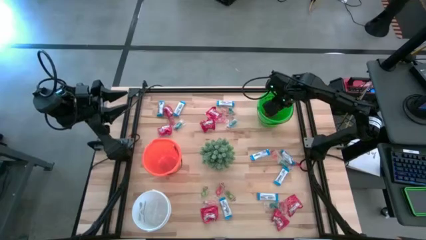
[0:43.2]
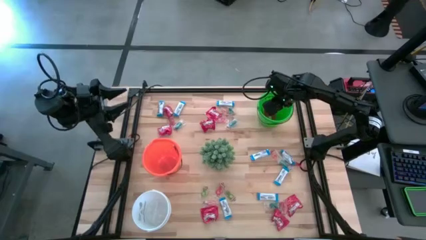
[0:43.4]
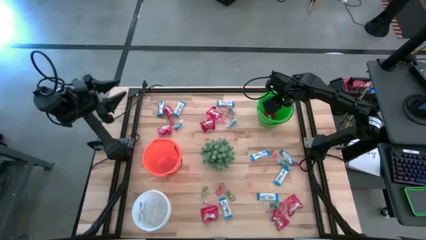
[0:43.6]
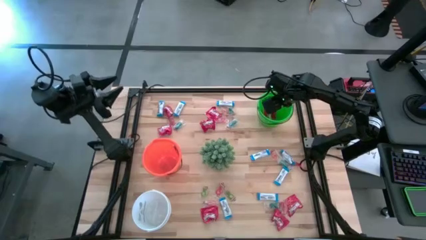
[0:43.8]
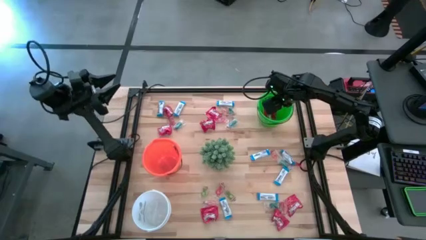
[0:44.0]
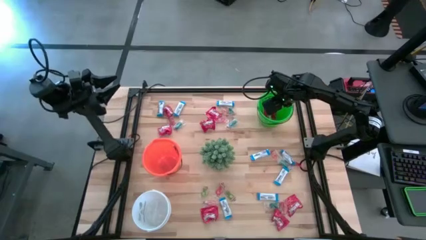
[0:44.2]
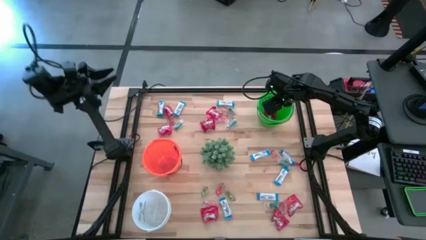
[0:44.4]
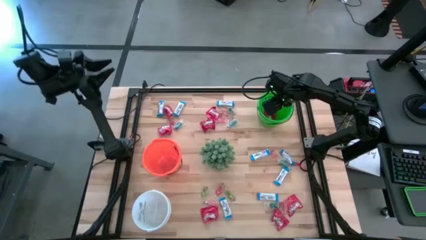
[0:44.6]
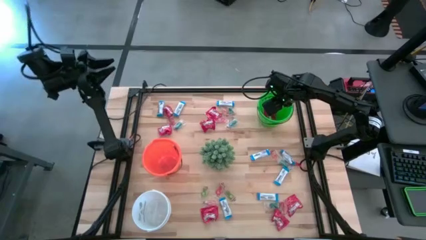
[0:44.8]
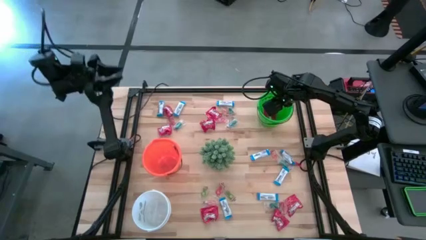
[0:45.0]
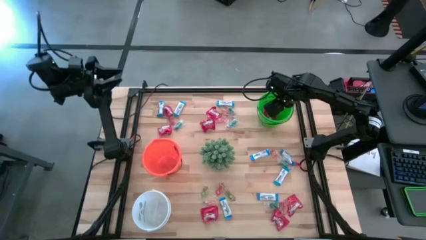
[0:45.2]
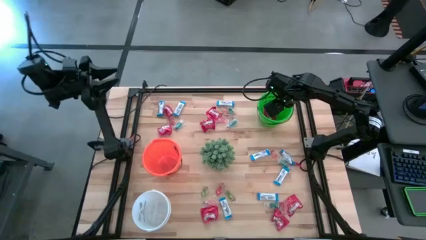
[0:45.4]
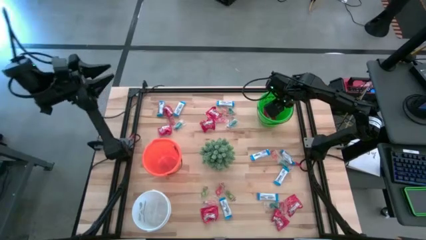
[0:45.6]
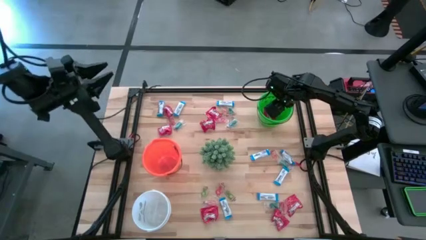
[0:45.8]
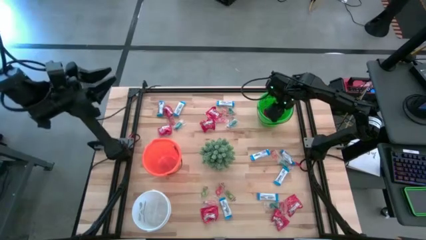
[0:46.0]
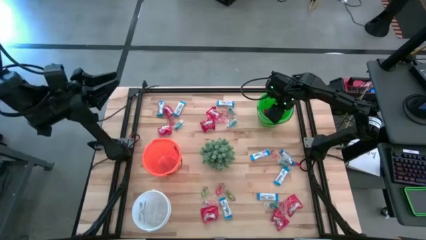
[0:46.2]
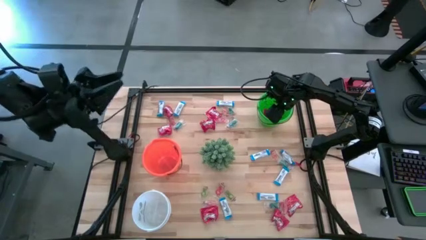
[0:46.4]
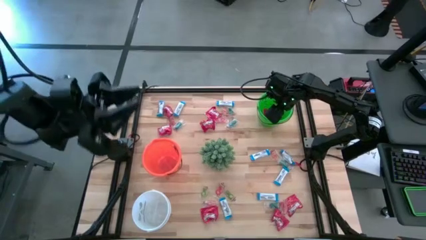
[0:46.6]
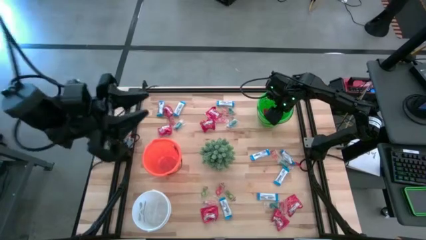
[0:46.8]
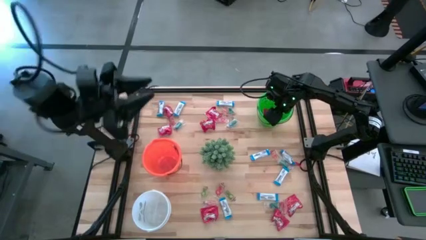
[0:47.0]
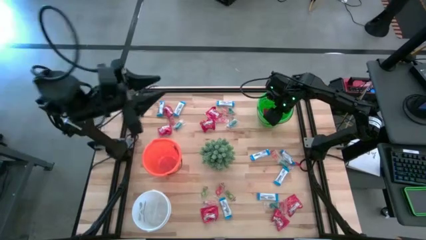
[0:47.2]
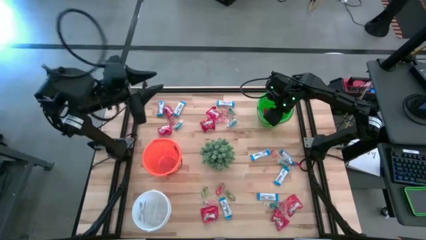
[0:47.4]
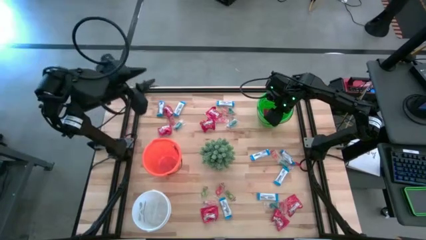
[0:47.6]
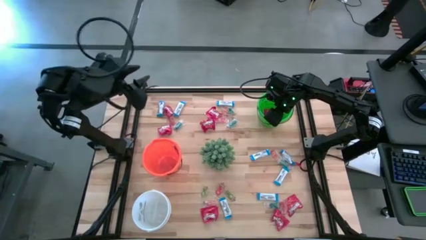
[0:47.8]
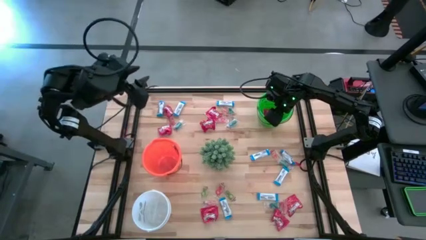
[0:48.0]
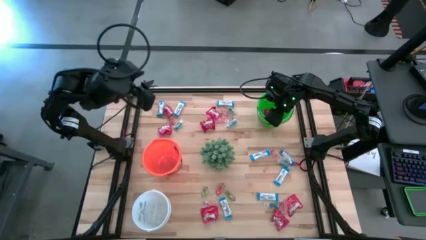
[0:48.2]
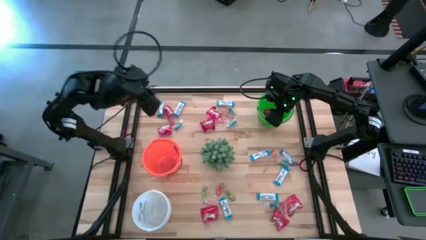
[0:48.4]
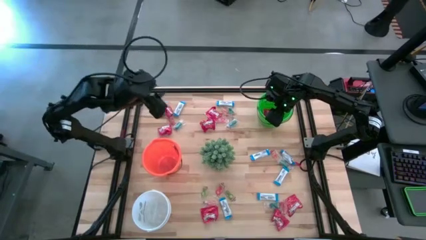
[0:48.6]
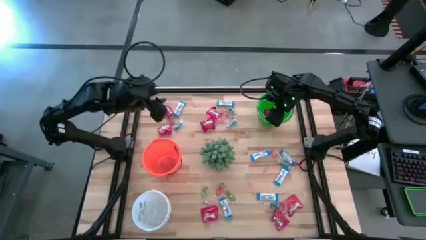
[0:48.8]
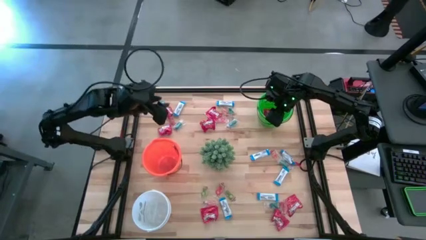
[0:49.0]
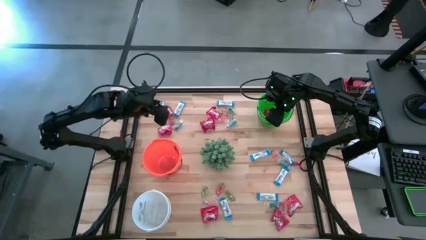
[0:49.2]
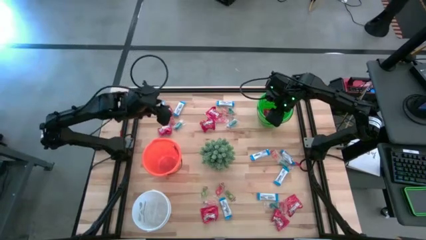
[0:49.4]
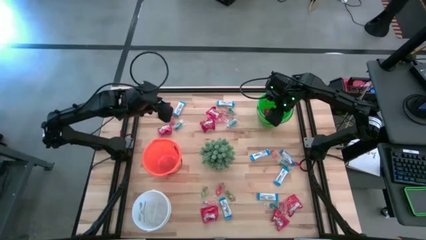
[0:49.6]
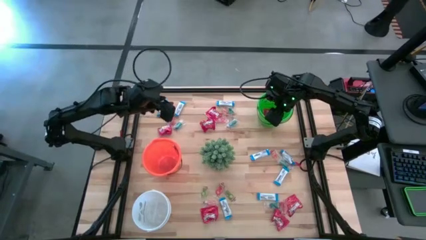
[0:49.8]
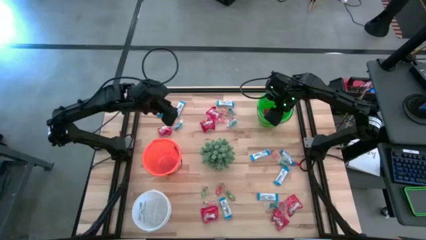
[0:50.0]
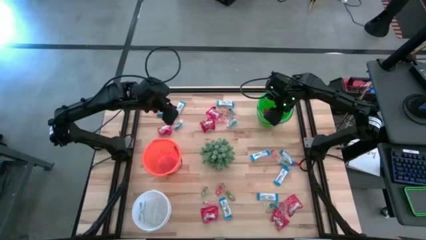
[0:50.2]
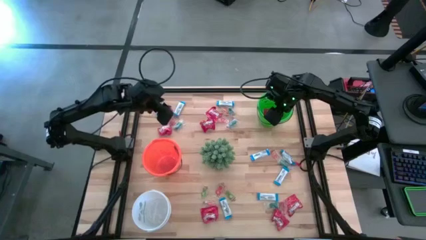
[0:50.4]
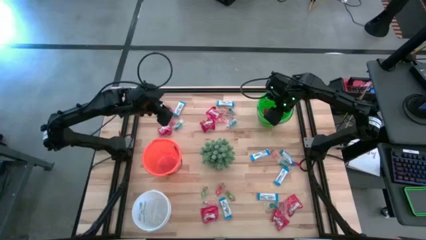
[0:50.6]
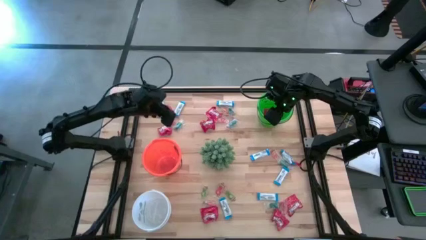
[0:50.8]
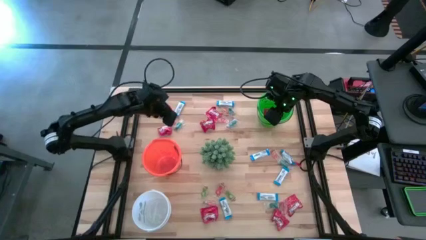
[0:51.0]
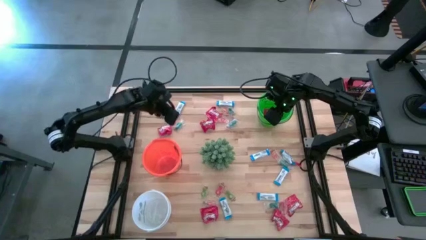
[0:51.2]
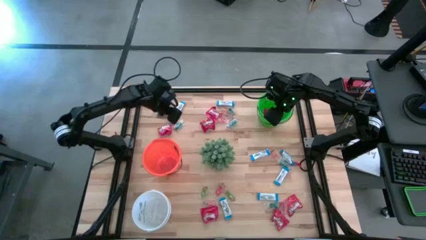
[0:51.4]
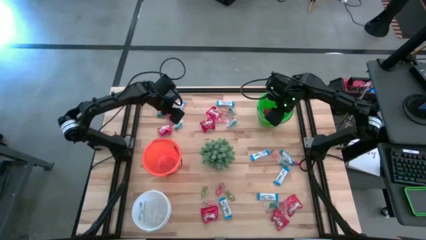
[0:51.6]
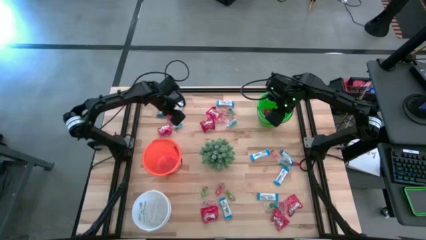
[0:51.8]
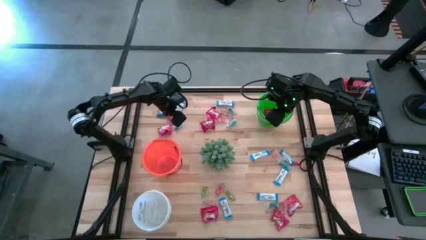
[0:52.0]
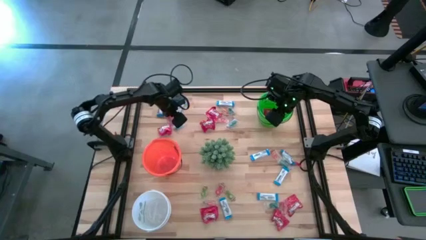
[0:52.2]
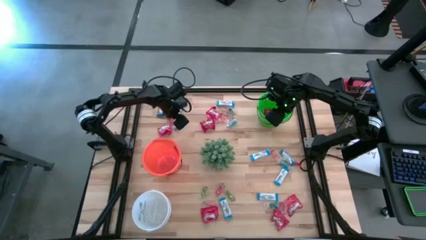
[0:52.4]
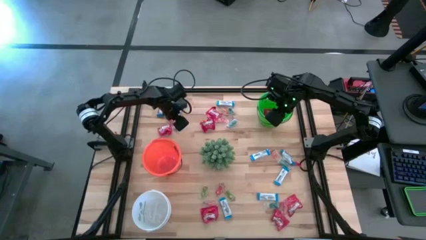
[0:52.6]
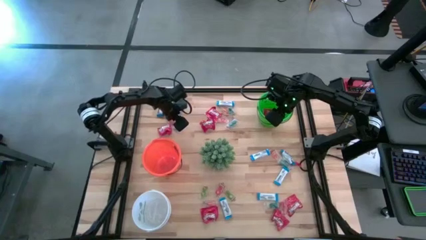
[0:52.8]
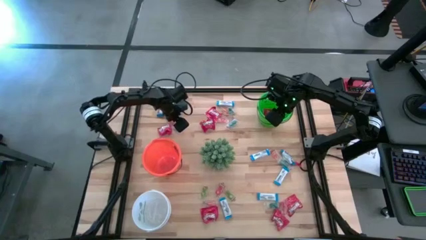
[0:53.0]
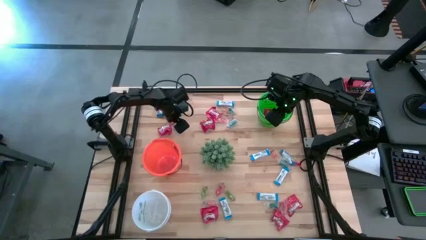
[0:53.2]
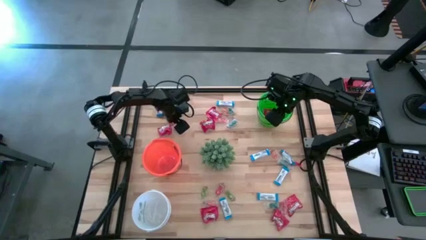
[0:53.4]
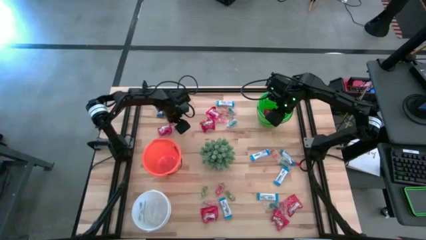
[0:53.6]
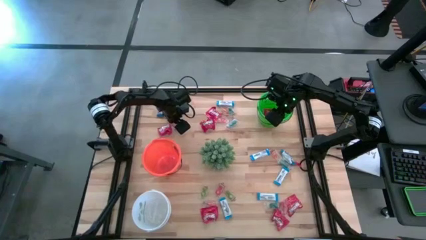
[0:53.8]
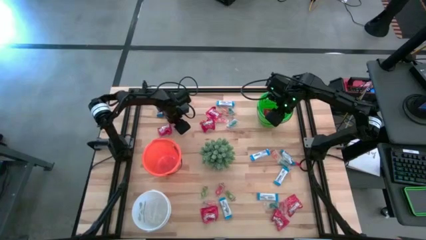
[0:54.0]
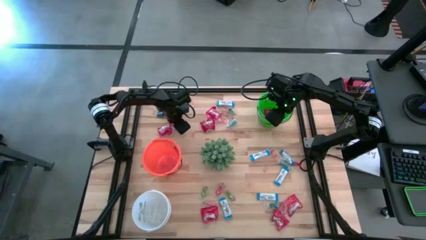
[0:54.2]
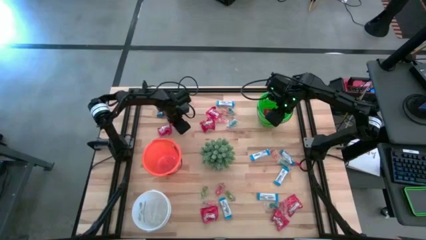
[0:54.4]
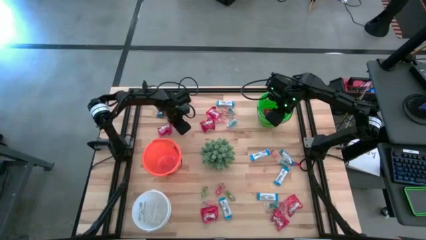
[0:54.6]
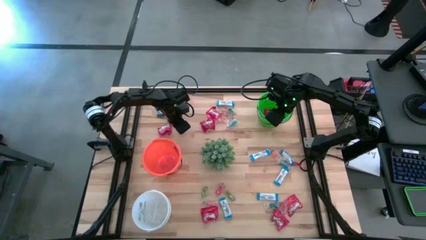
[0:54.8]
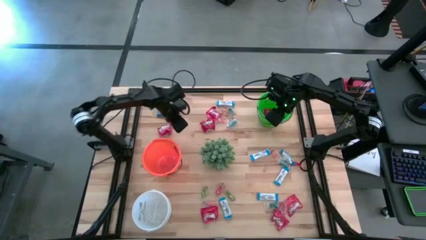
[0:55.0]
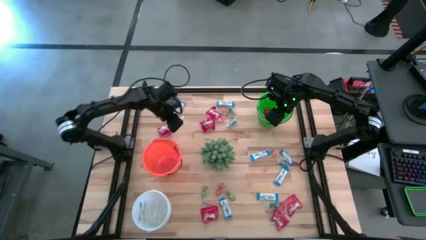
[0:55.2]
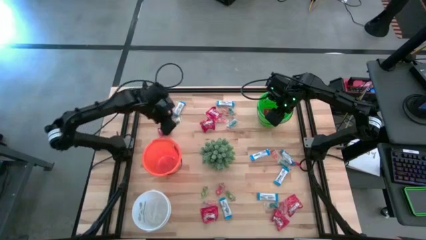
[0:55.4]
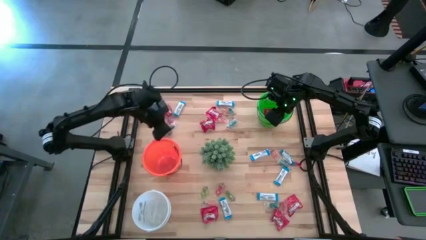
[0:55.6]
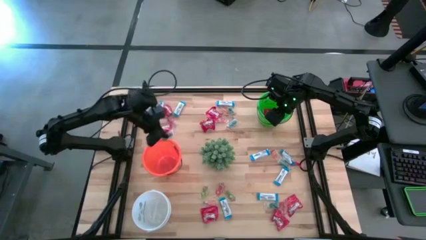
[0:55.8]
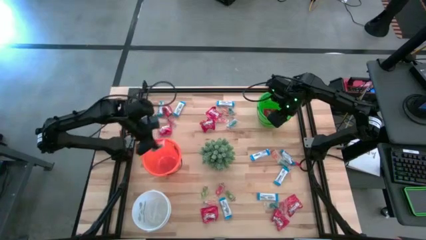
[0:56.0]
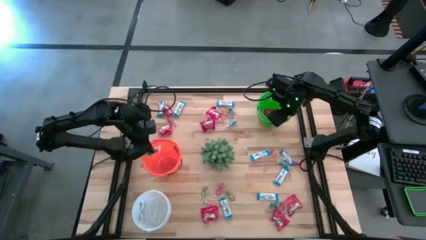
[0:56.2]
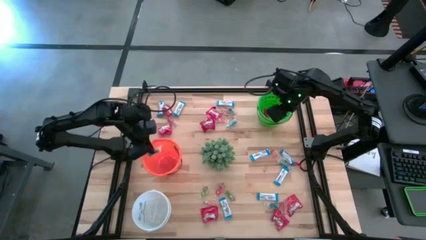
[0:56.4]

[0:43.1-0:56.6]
Task: Sort candy
Put the blue gummy into the orange bucket
